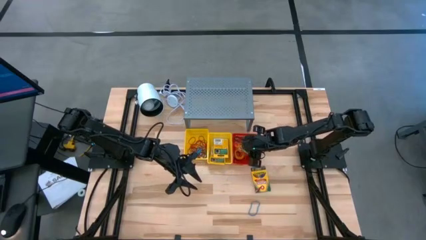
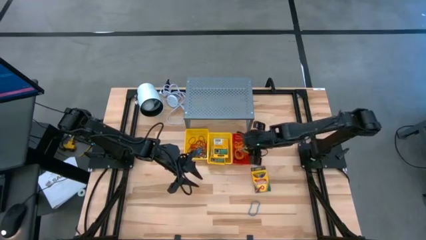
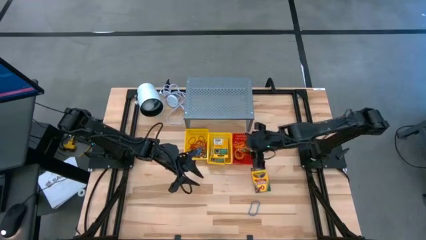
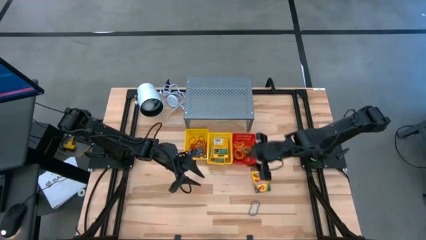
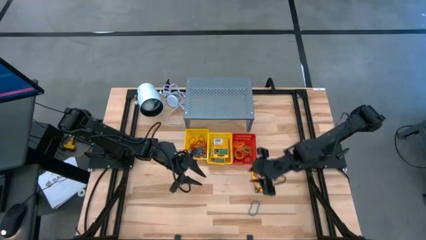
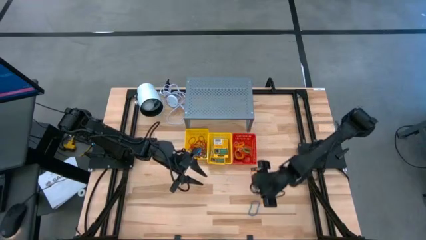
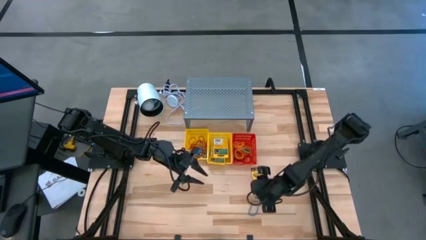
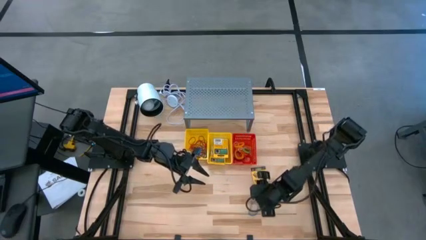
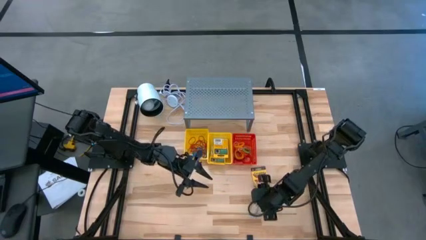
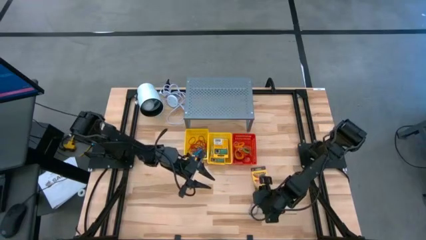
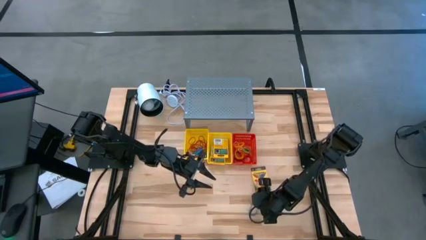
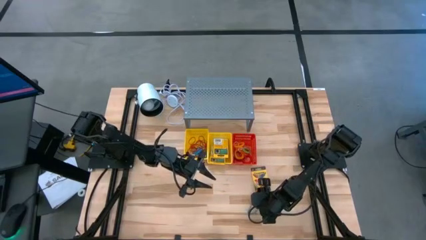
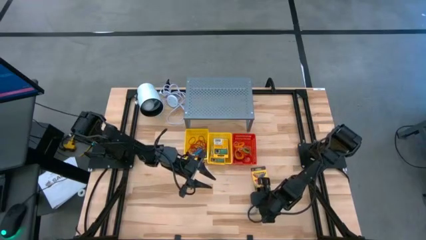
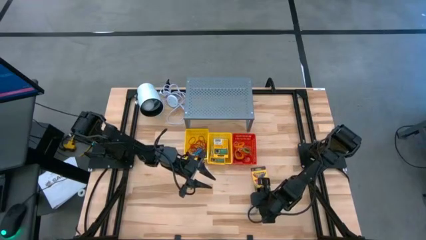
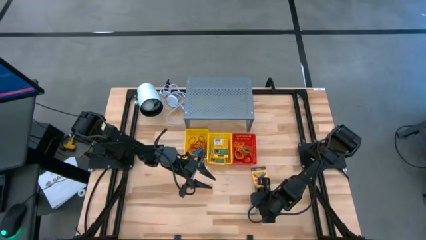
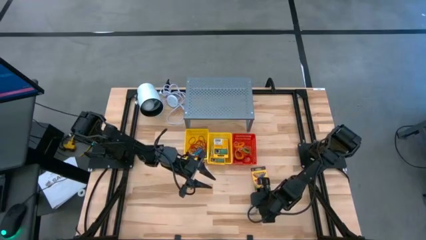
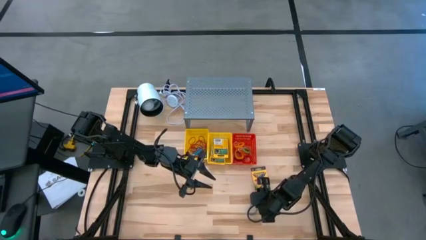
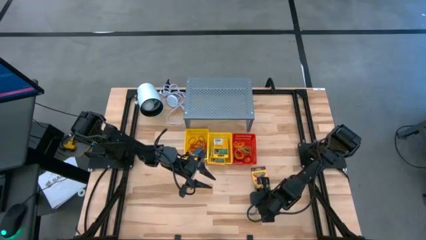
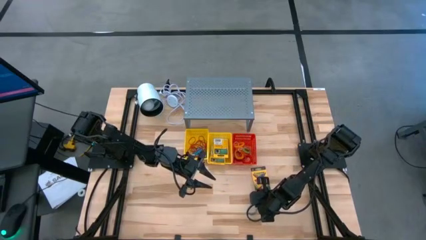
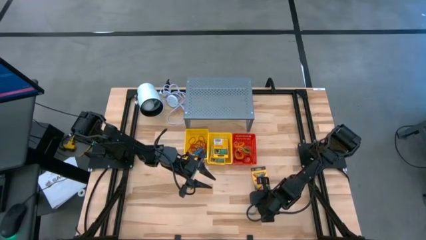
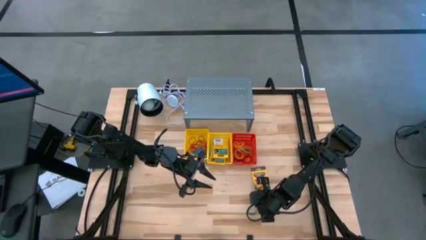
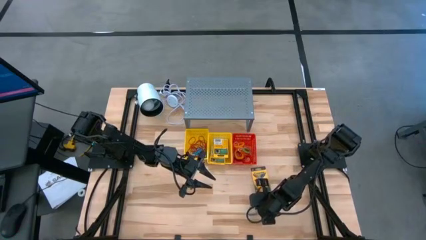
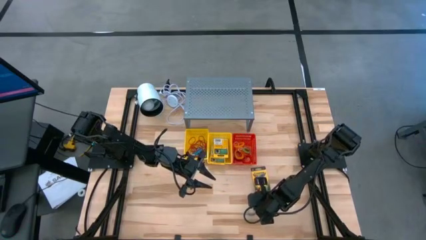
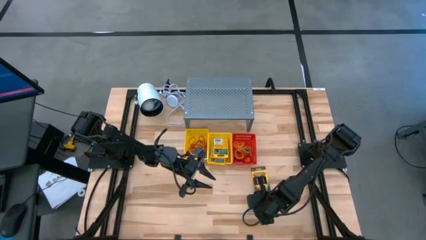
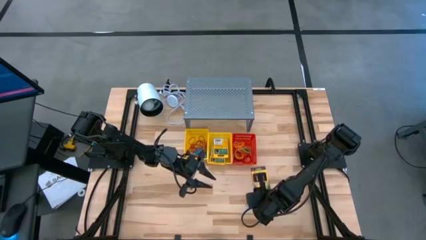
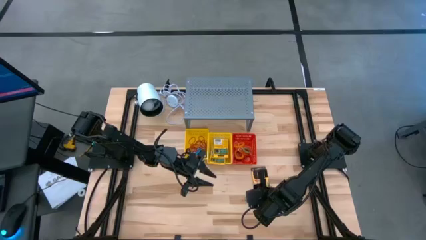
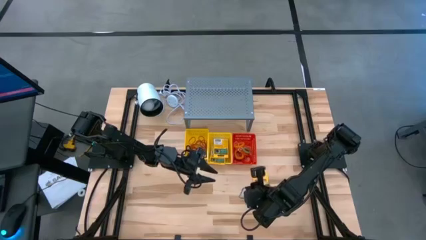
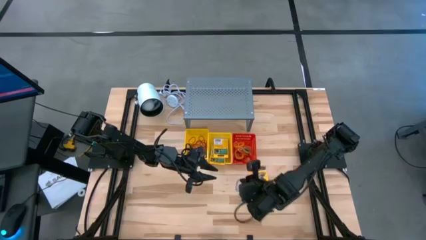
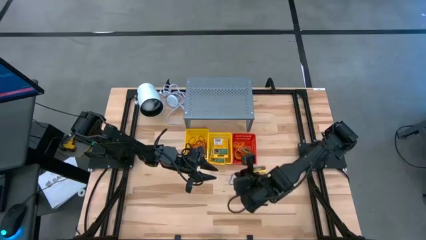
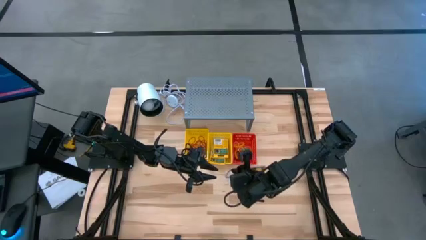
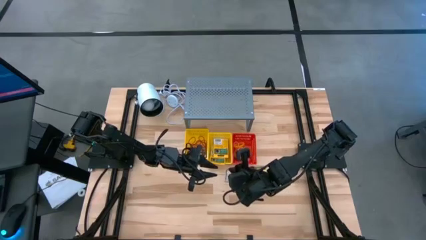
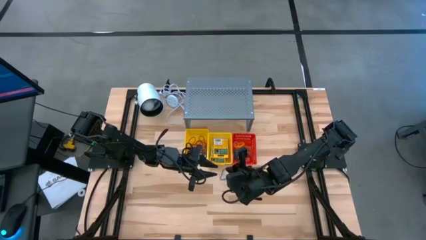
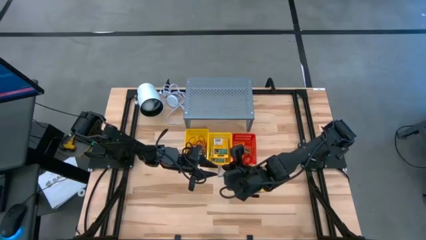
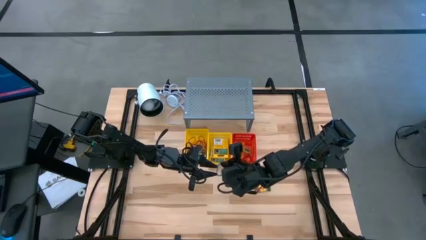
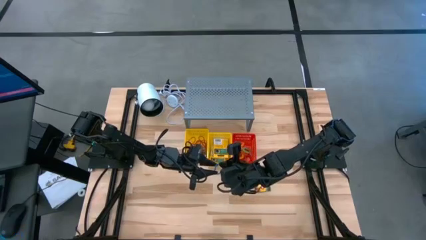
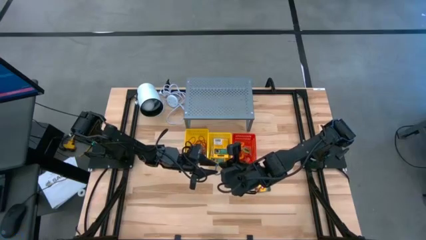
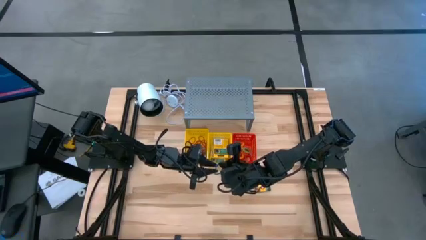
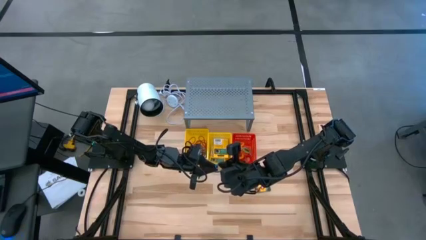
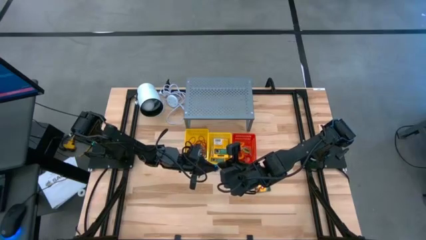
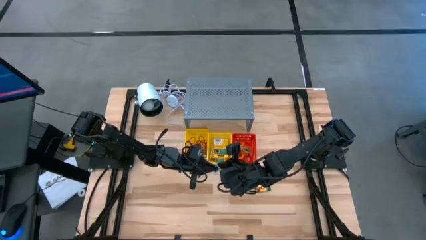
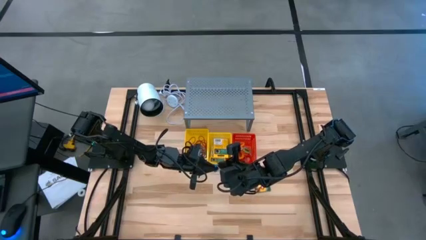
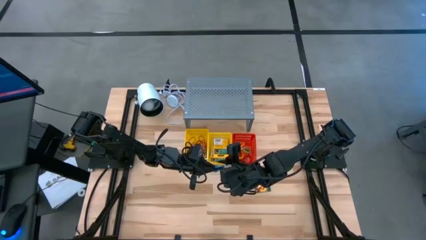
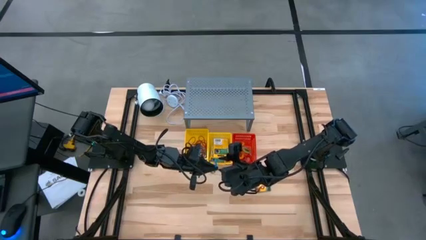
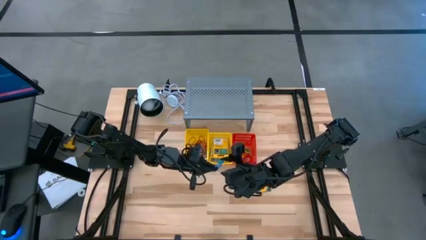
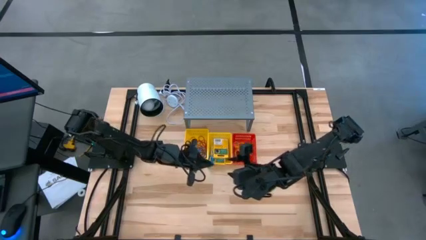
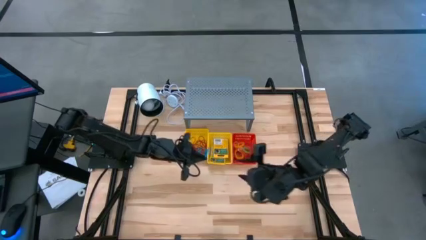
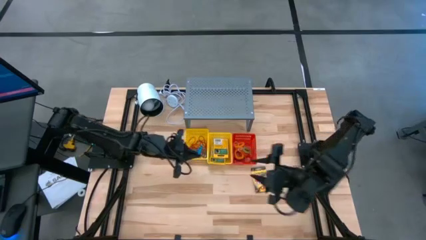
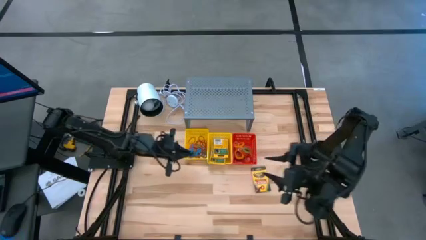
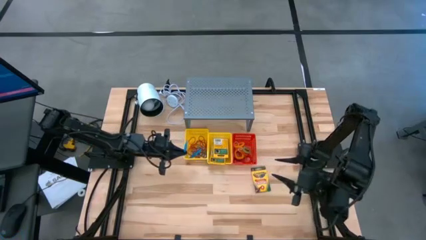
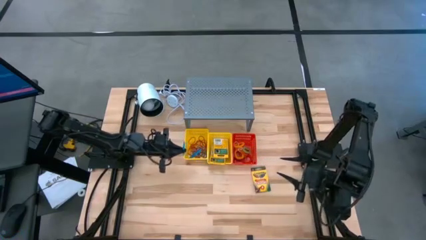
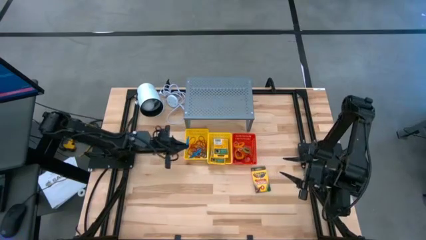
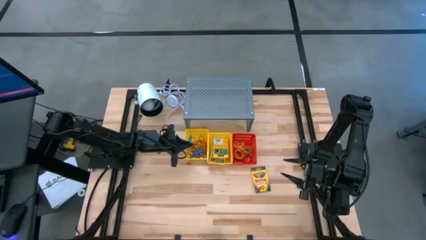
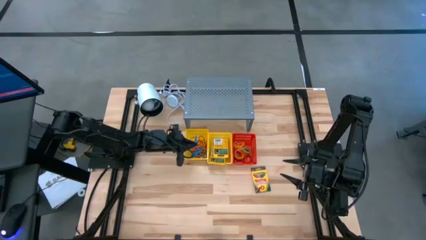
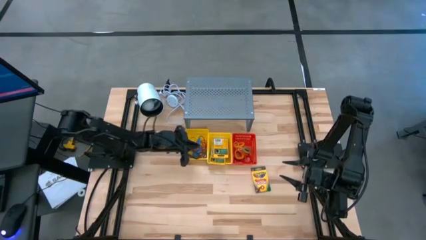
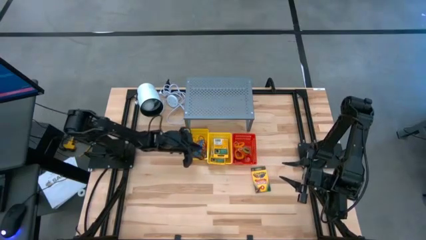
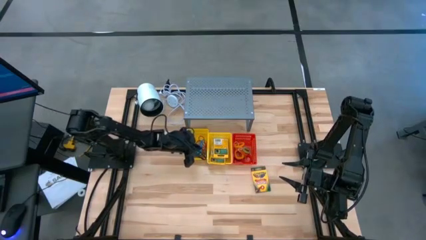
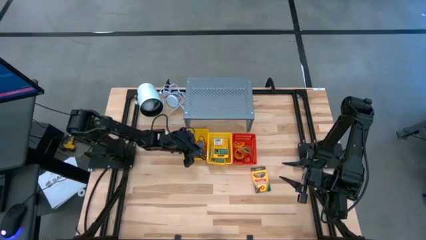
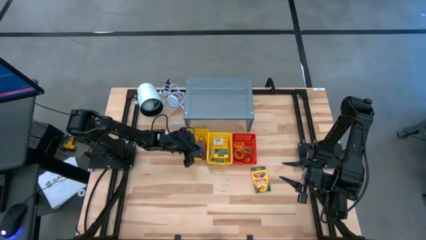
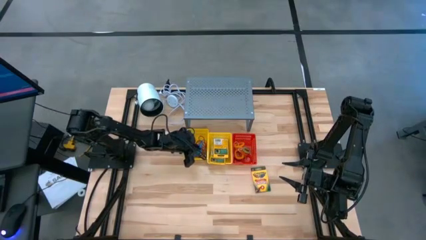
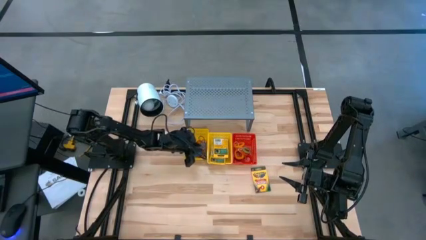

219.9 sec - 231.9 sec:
Task: Pick & Place Office Desk Supplies
Put the blue rubber band into the left yellow basket

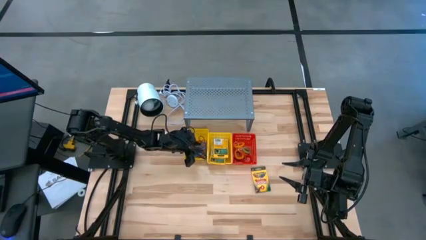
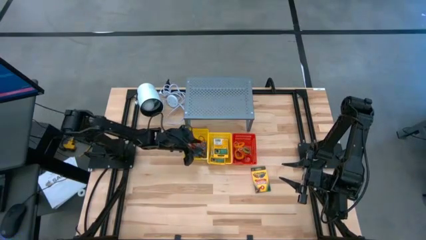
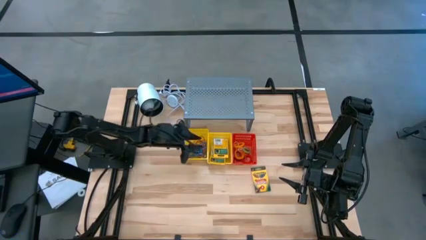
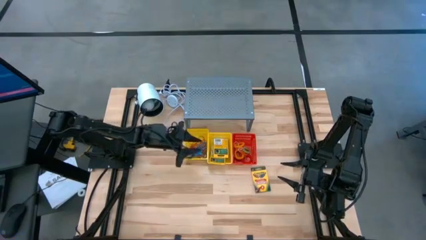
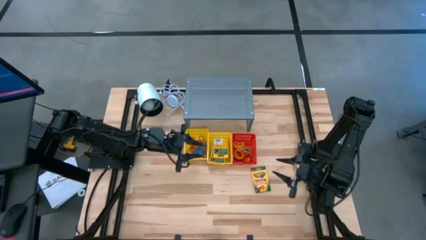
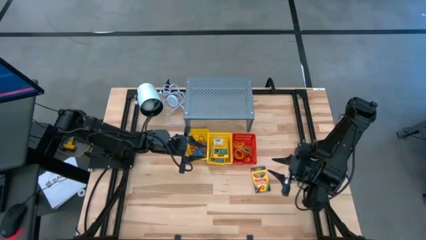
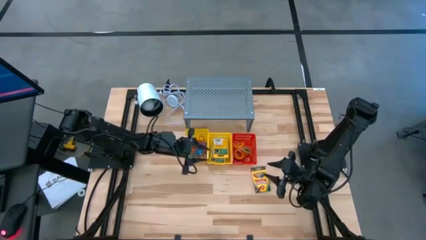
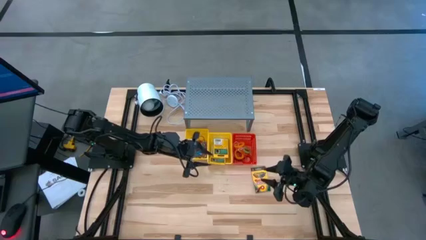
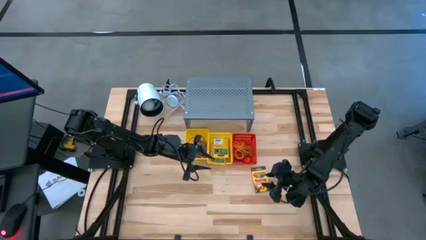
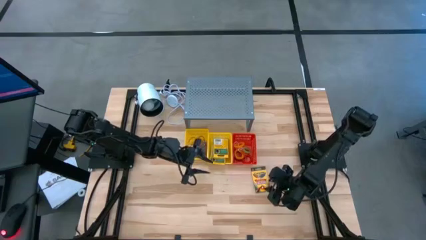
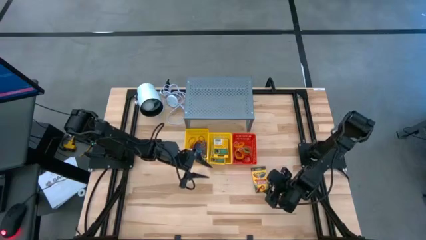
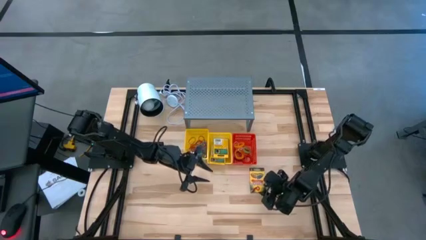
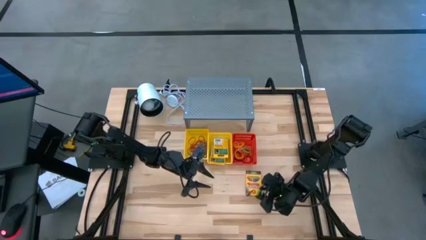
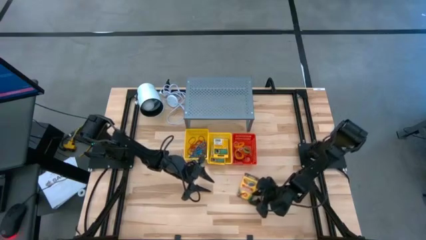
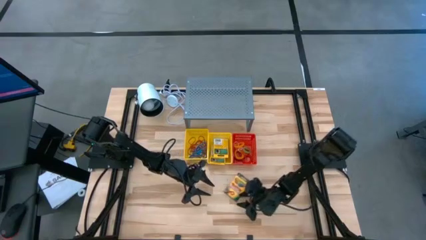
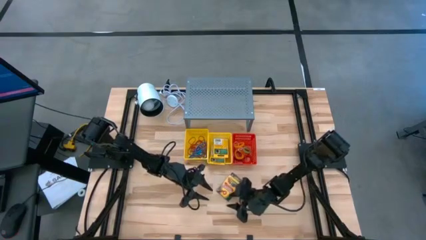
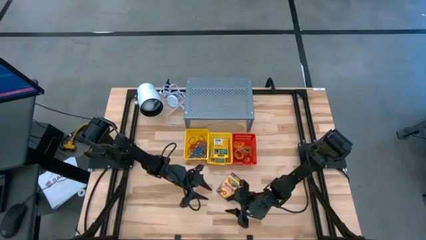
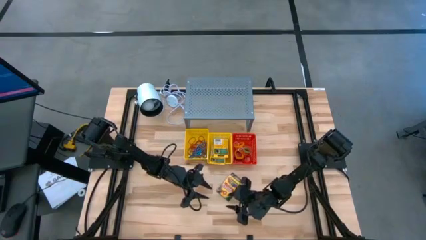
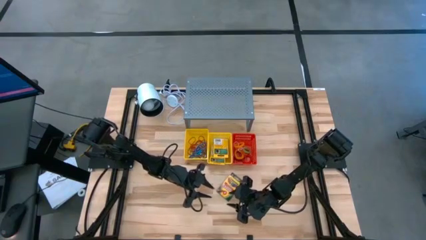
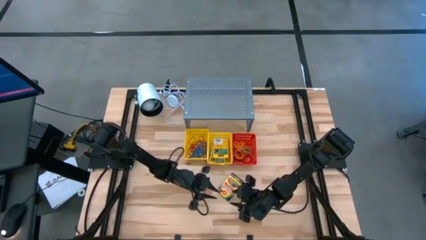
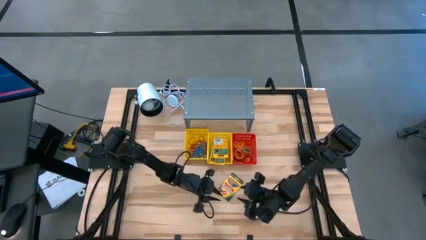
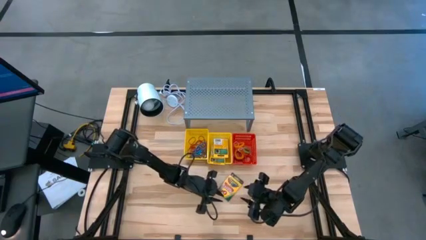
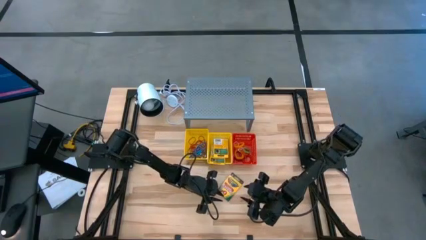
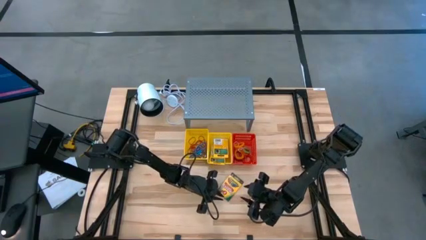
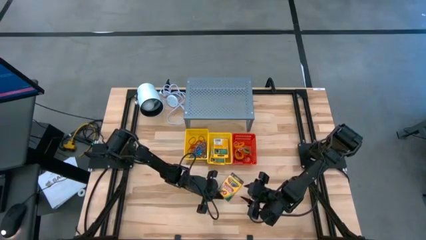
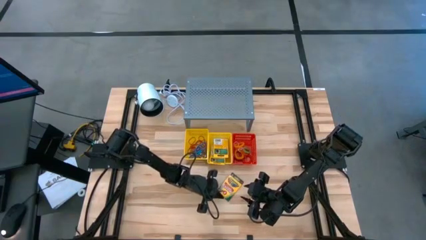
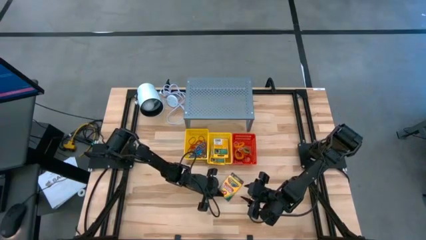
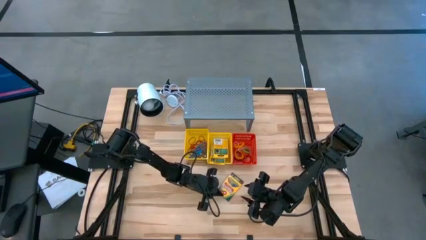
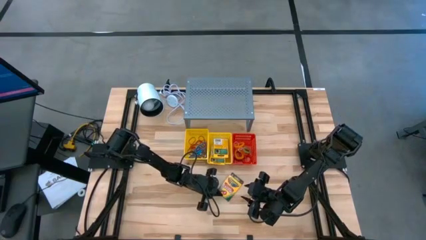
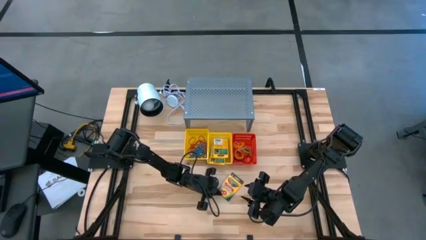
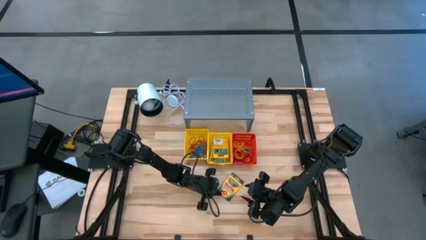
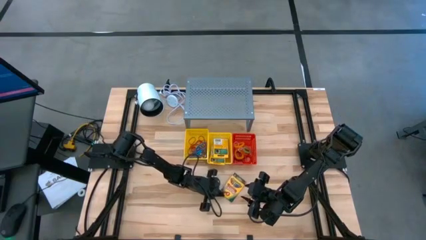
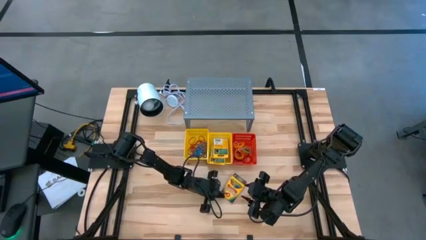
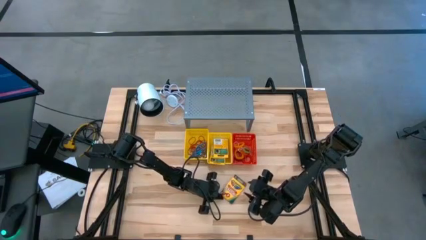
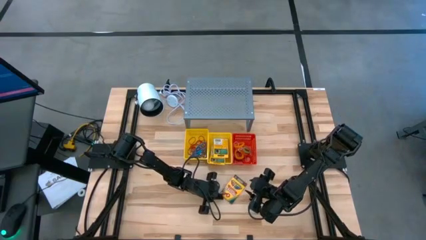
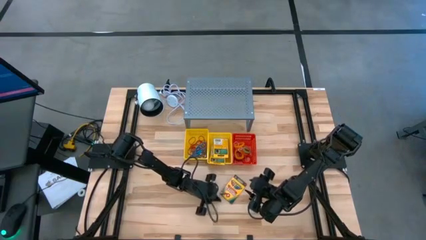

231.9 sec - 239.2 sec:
Put the crayon box into the right yellow basket
